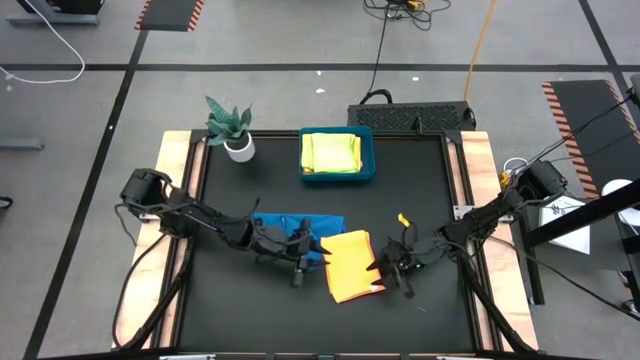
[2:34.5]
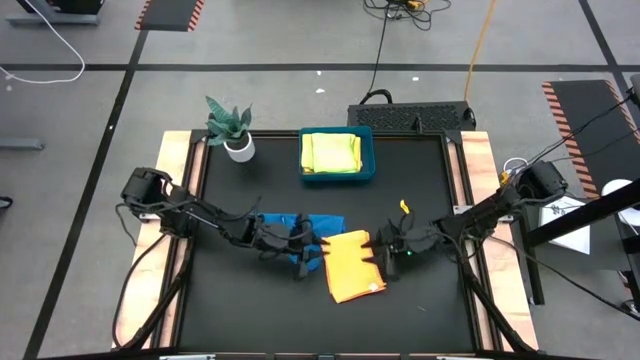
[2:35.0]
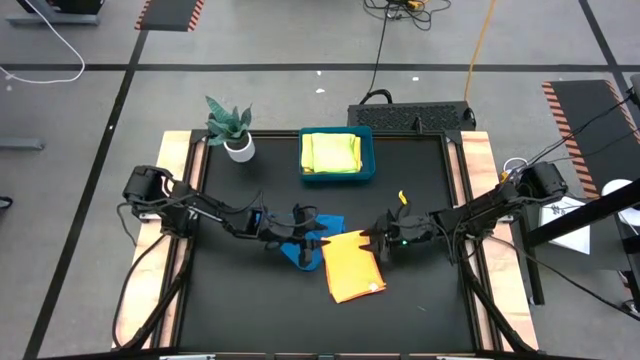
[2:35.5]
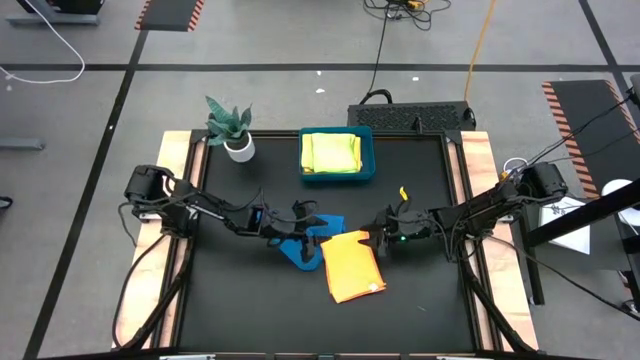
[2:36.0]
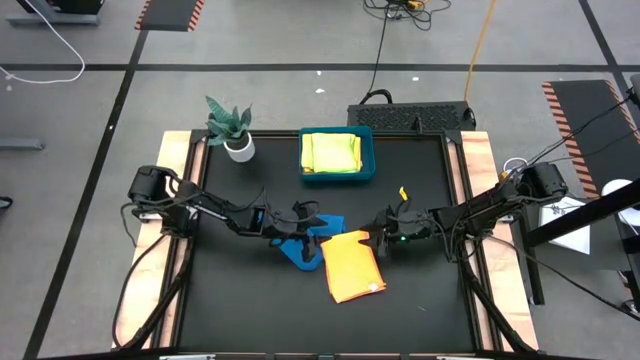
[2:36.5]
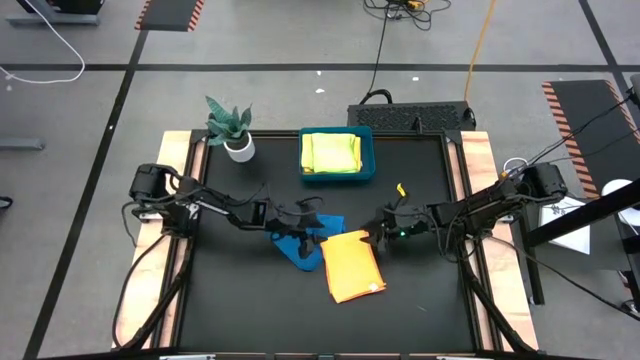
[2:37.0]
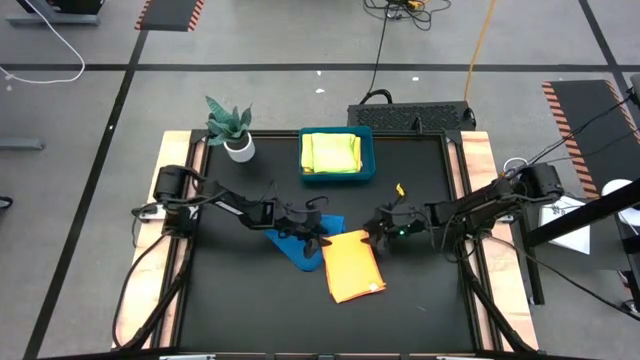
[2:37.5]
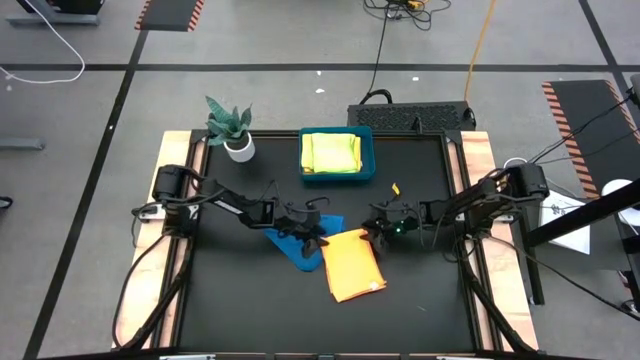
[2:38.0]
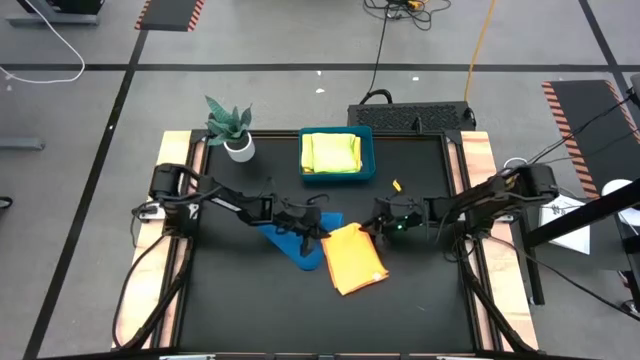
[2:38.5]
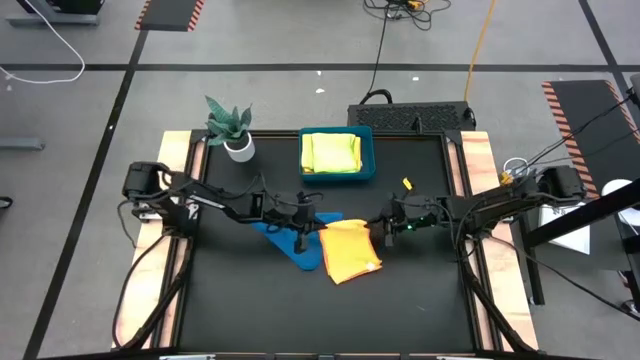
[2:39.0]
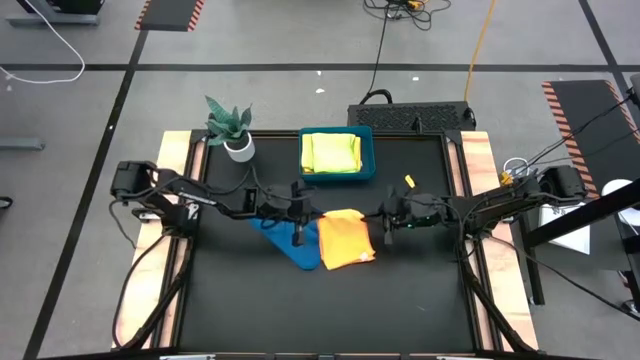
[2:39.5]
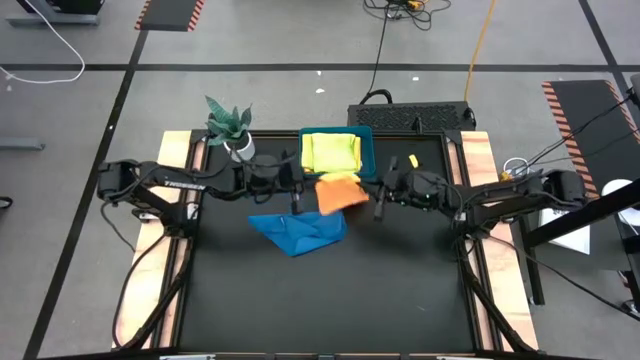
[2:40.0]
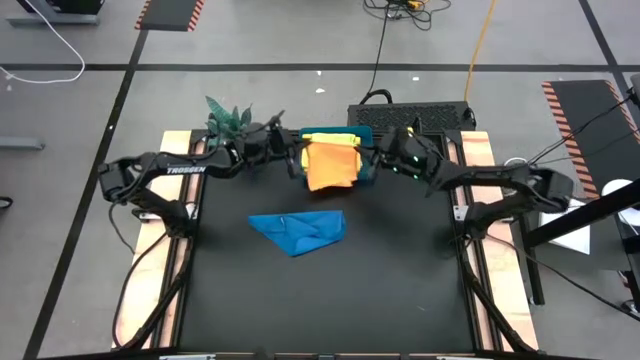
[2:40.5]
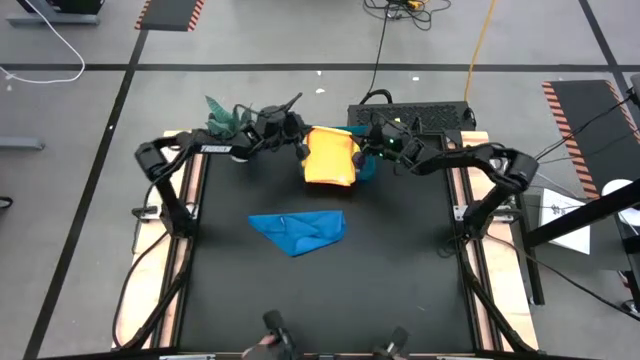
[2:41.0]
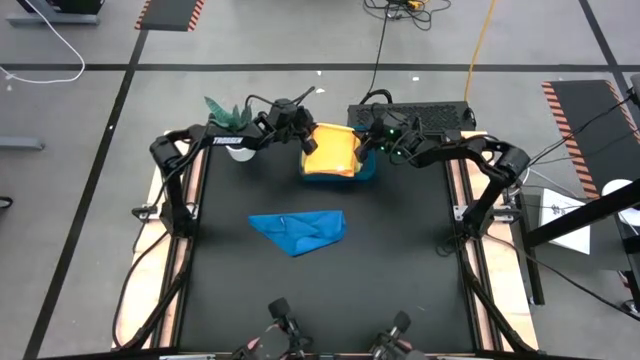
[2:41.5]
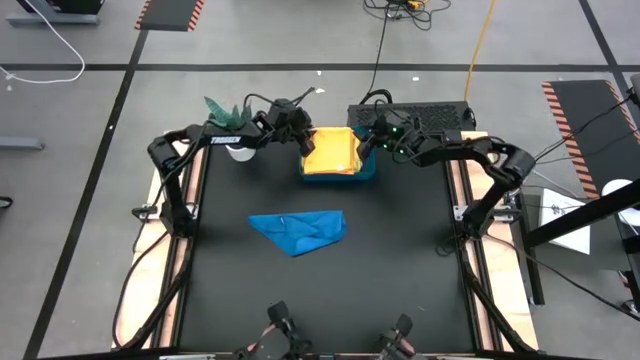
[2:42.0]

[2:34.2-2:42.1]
Task: Fold microfiber towels
Put the folded orange microfiber cloth into the blue bin

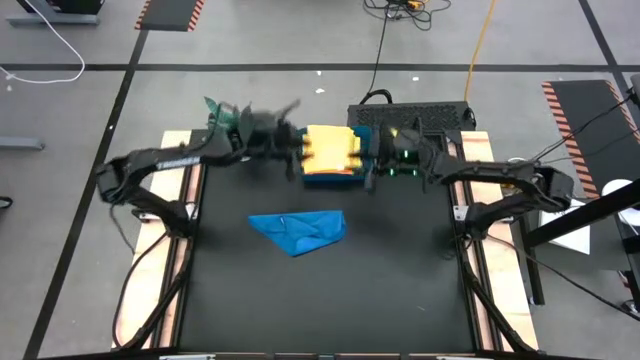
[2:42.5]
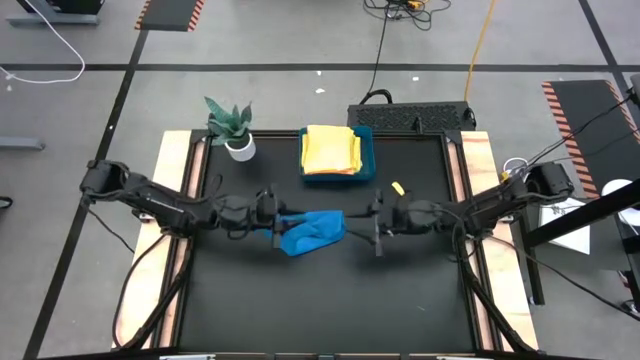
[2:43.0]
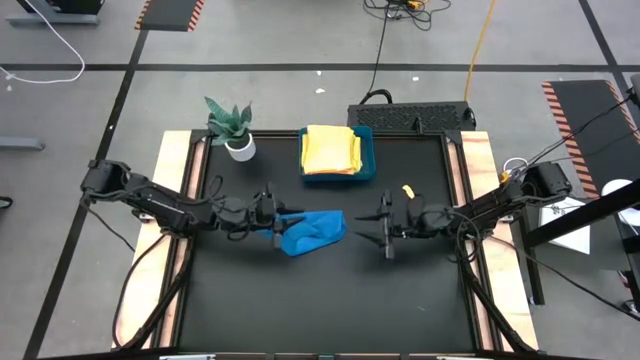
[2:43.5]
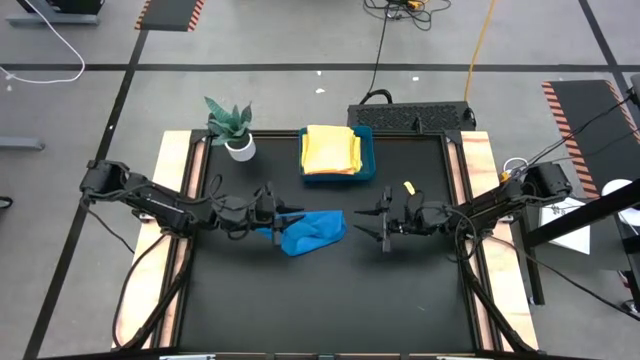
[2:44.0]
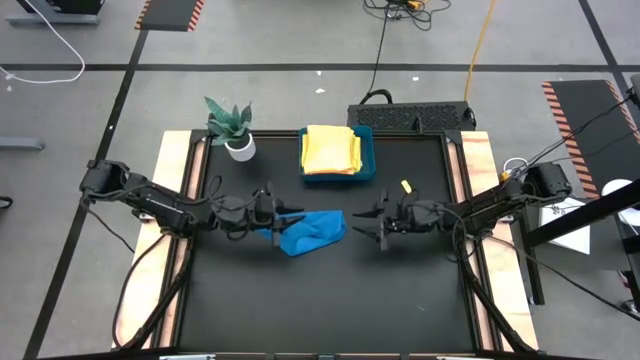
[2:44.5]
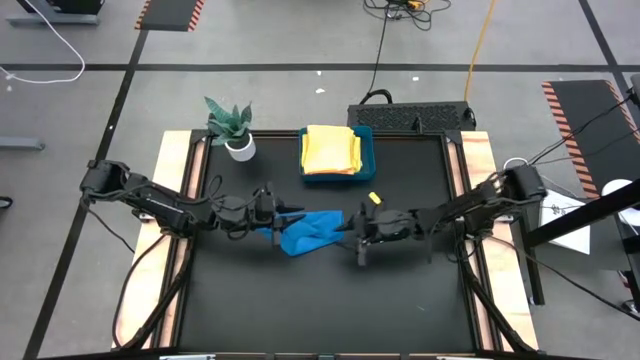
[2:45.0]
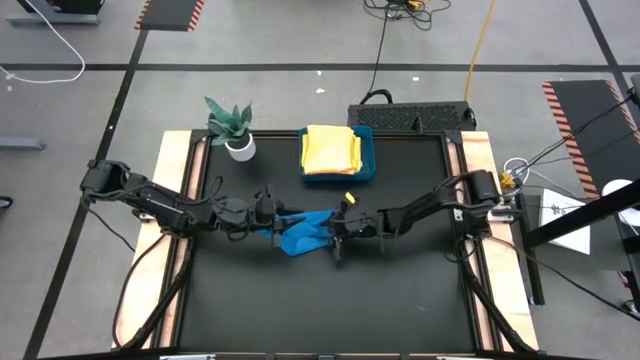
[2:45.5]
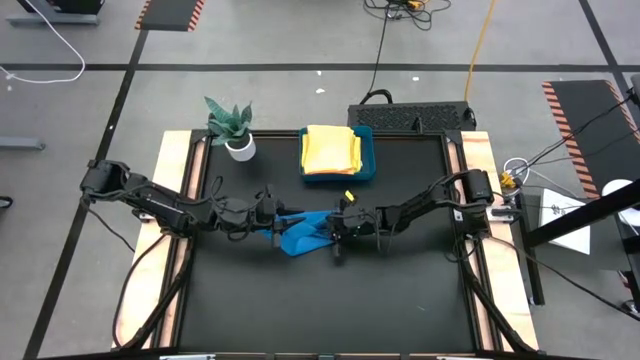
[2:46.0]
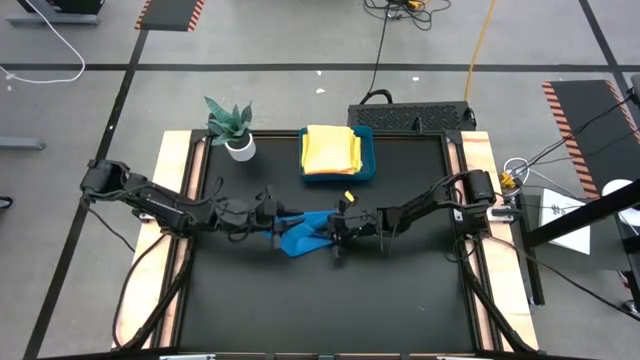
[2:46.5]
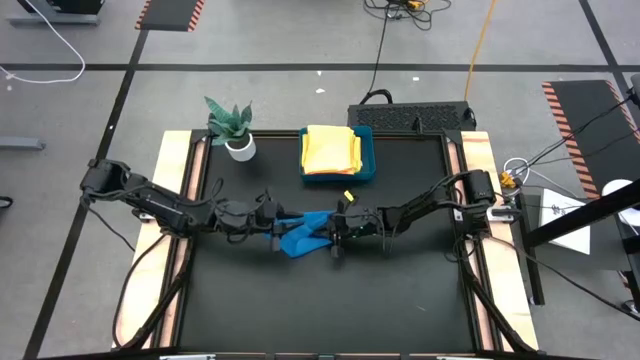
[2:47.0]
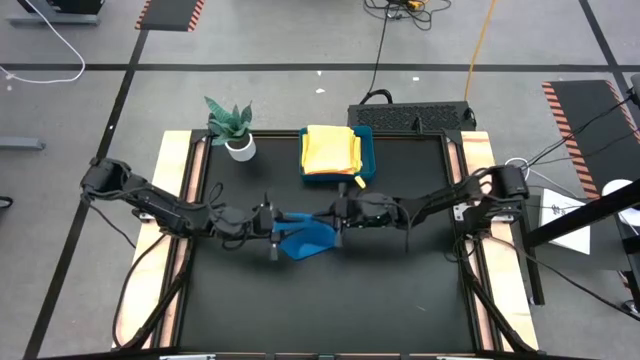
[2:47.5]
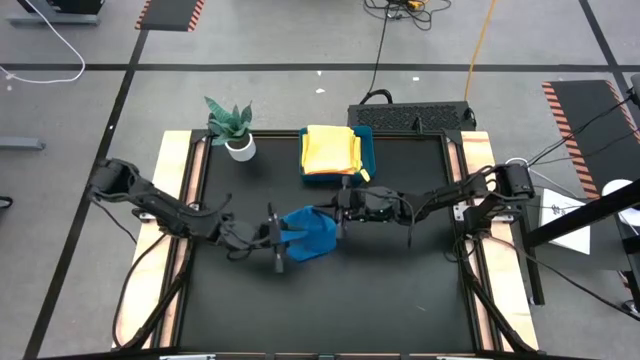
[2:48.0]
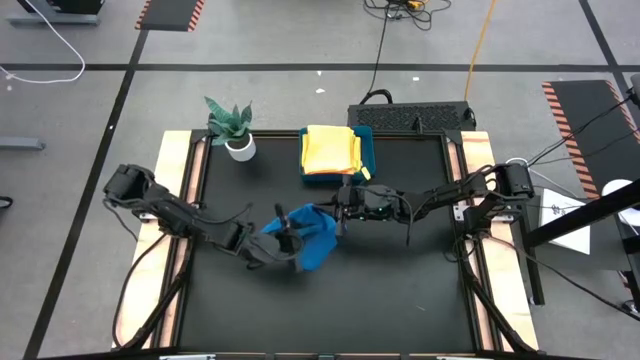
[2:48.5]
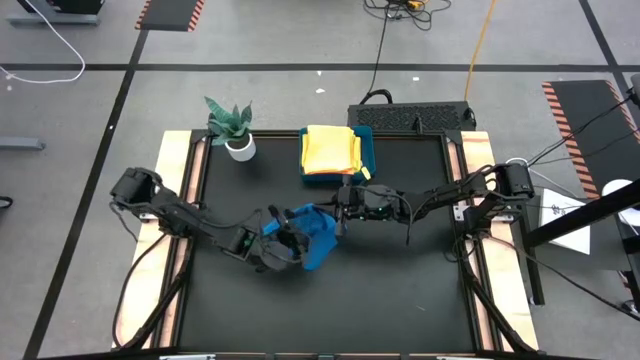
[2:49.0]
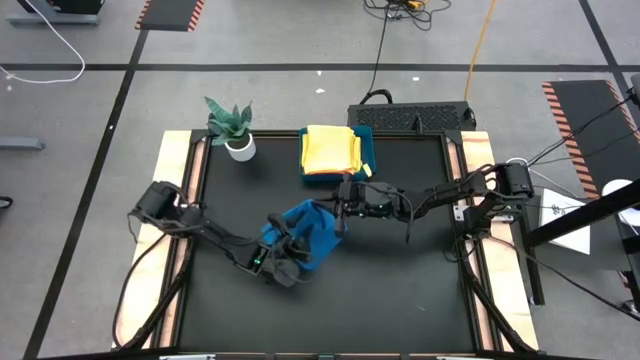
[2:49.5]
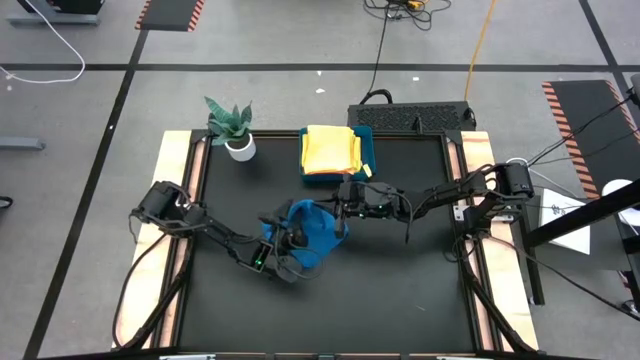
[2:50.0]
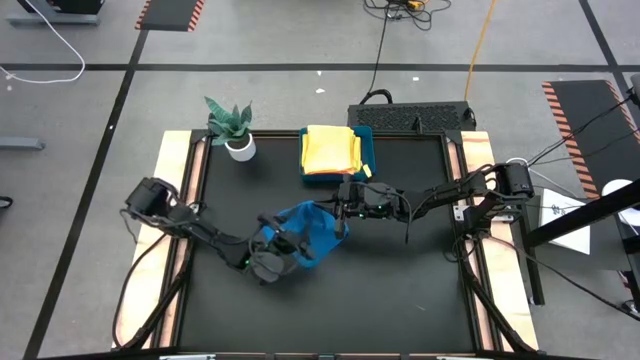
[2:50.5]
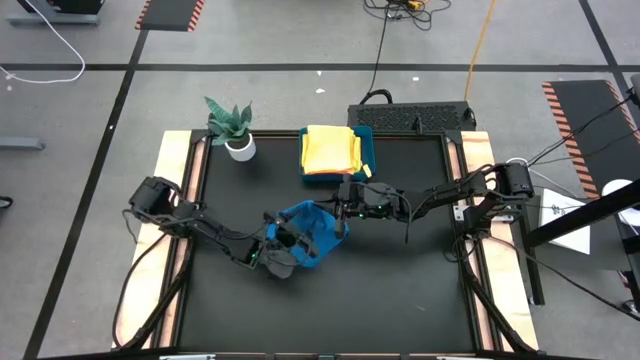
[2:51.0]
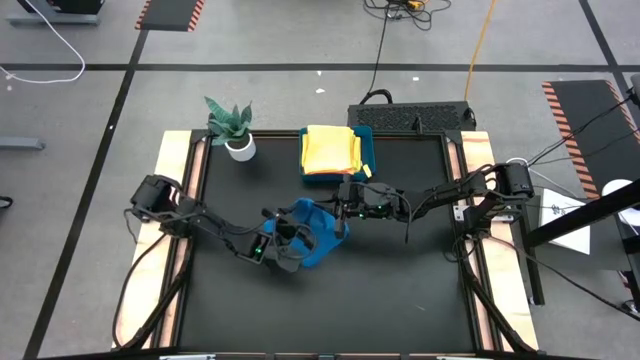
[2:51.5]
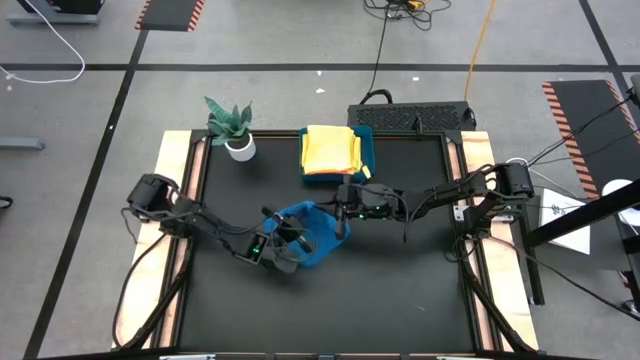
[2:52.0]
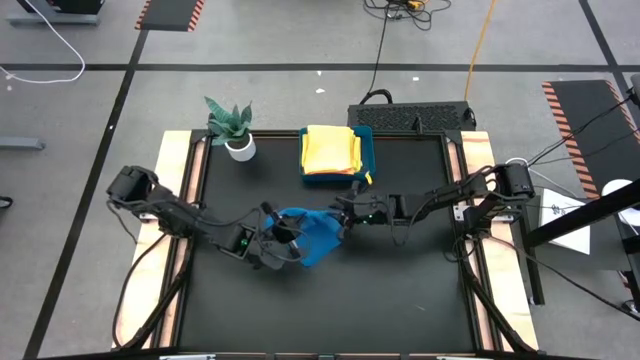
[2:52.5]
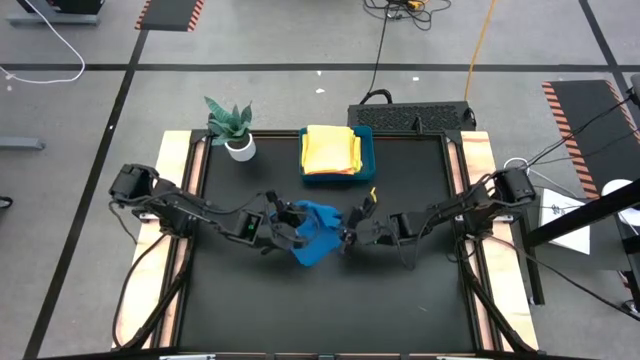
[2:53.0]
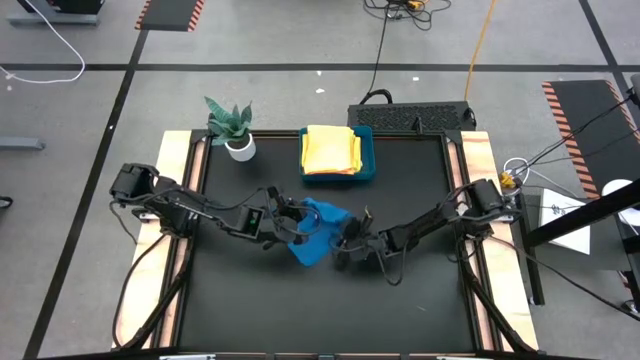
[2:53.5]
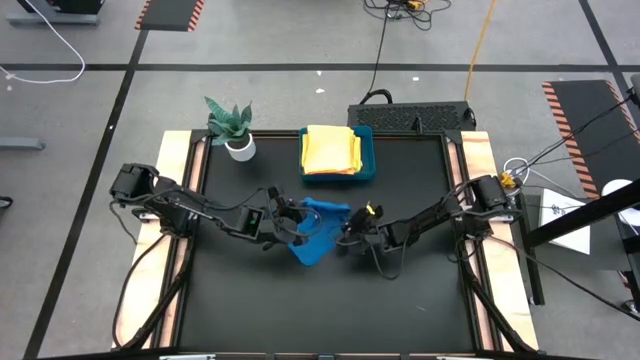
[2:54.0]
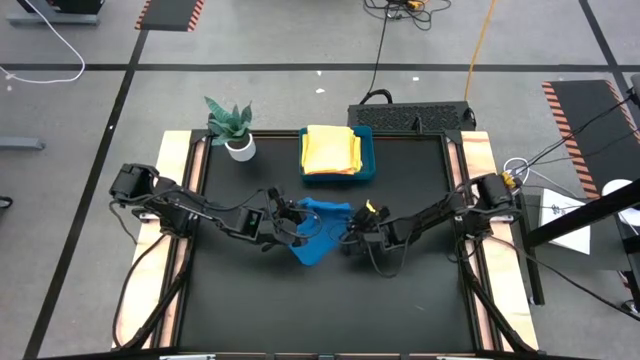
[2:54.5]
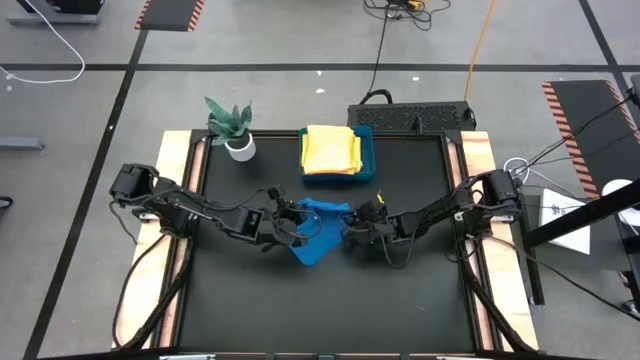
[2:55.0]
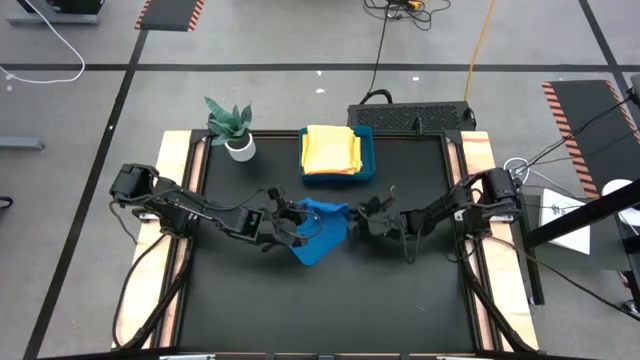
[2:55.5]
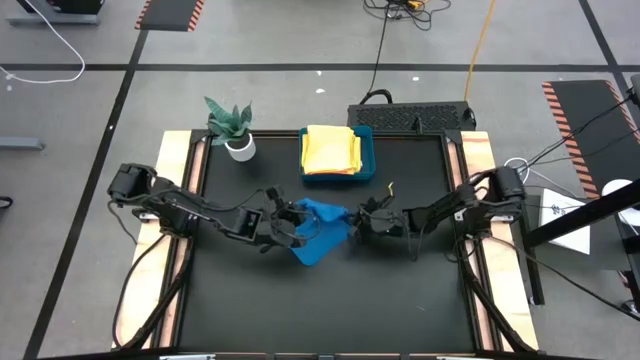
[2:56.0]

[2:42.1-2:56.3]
Fold the blue microfiber cloth

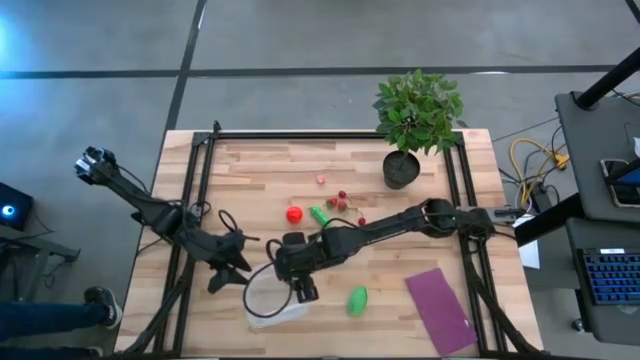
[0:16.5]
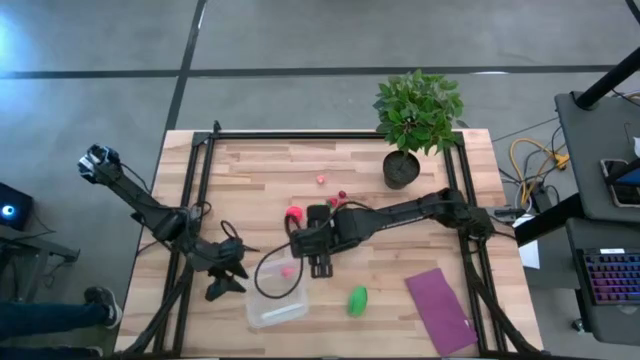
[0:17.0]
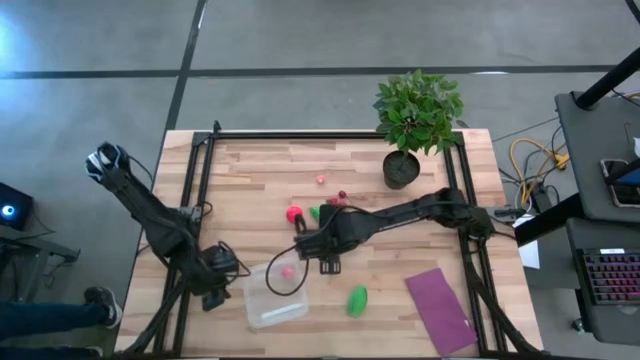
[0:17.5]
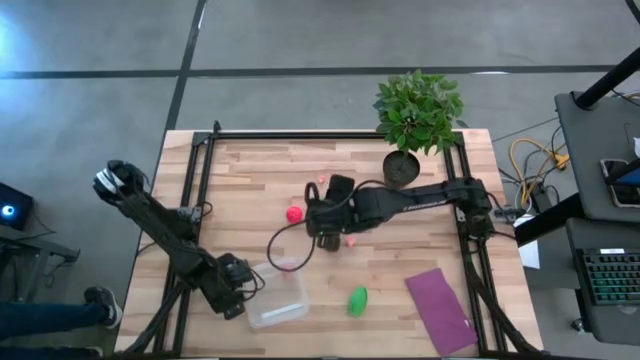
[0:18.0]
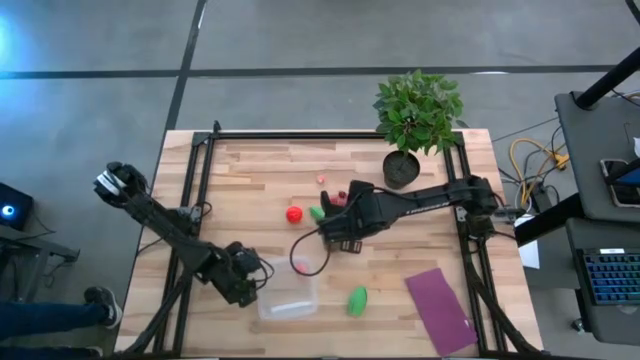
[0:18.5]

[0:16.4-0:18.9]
Task: Pick and placing Produce into tupperware
Adjust the transparent bin on the table
